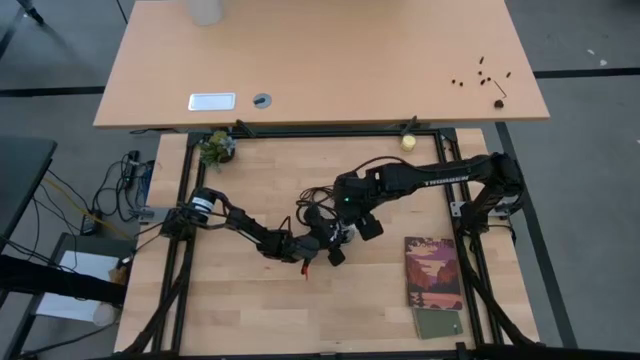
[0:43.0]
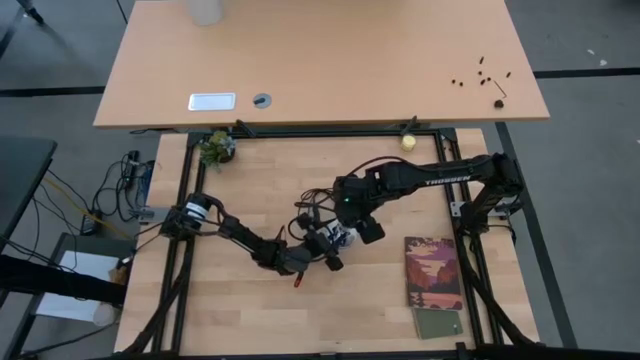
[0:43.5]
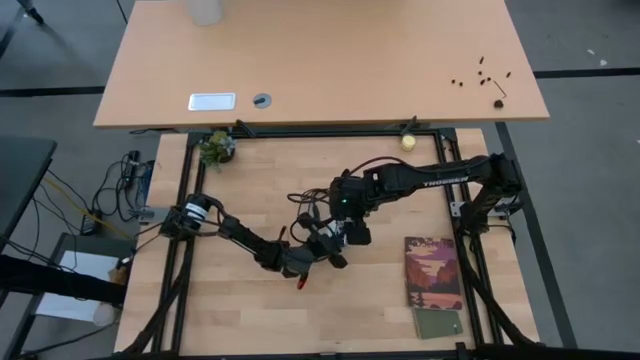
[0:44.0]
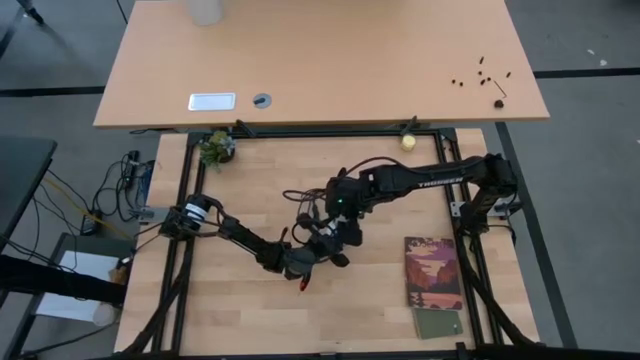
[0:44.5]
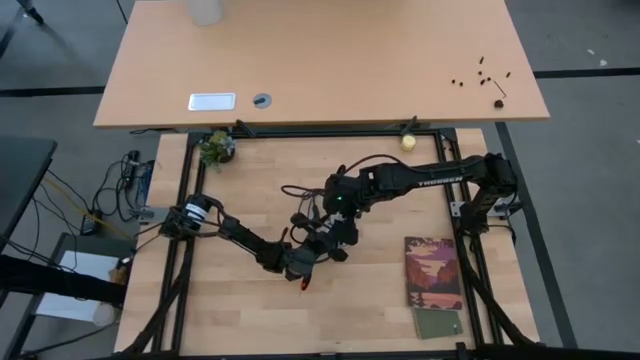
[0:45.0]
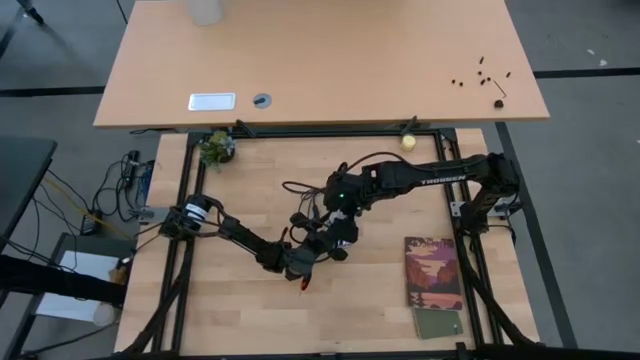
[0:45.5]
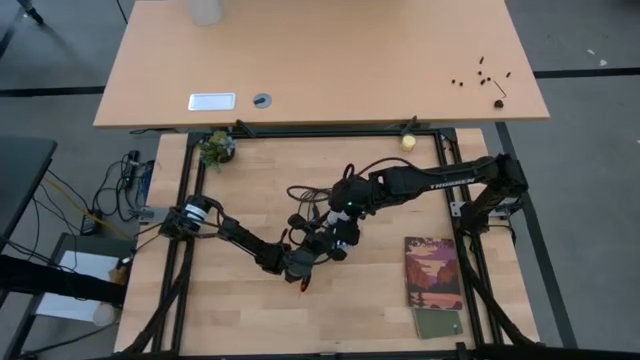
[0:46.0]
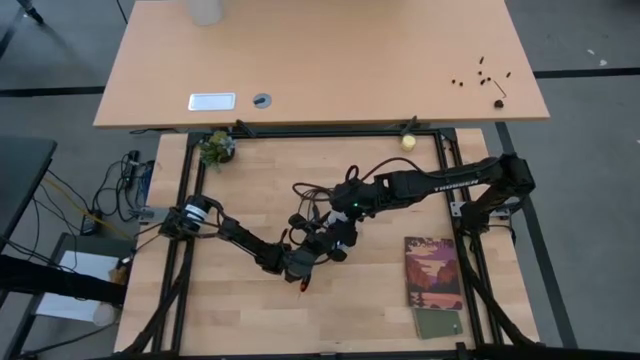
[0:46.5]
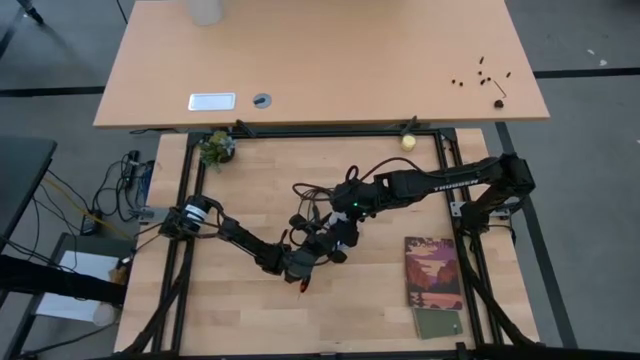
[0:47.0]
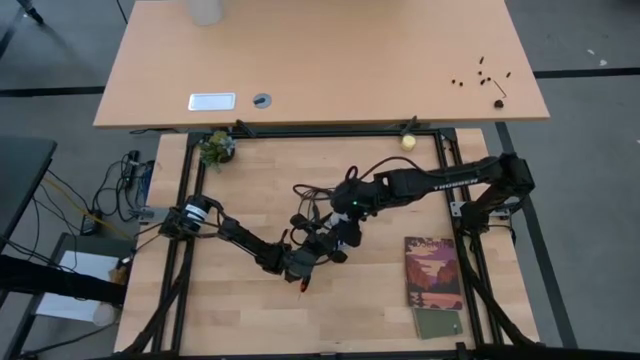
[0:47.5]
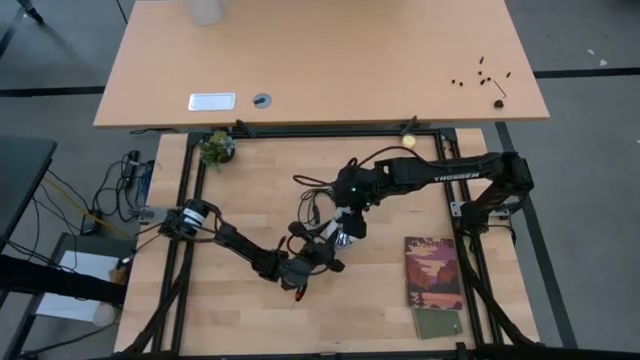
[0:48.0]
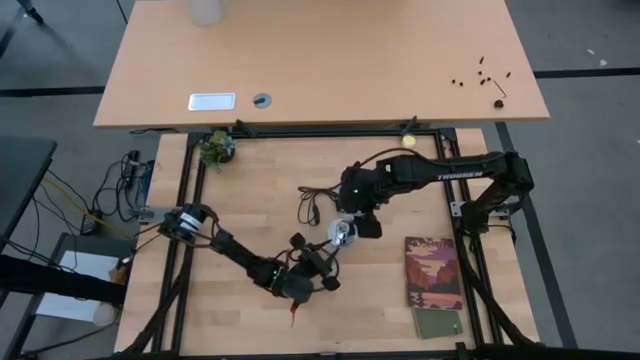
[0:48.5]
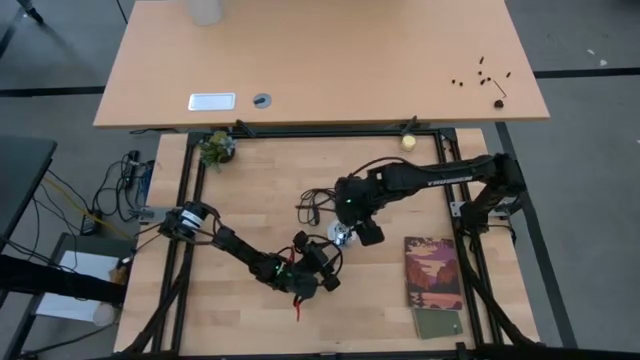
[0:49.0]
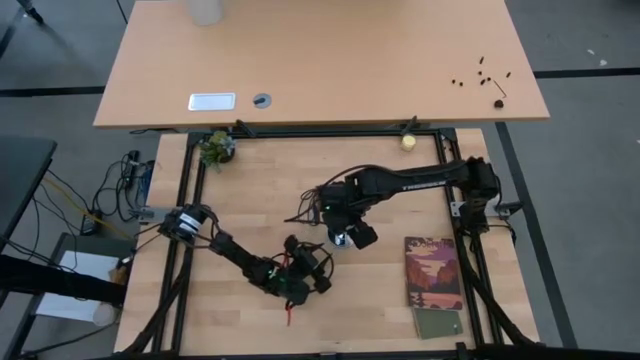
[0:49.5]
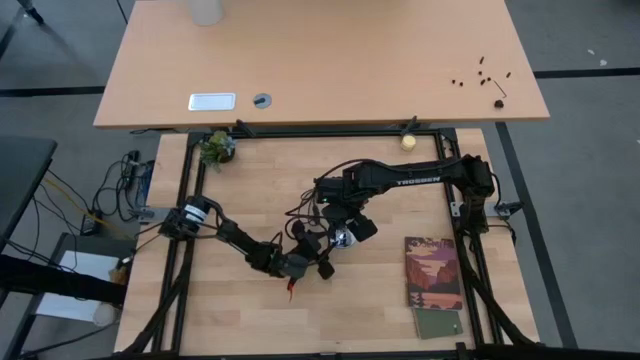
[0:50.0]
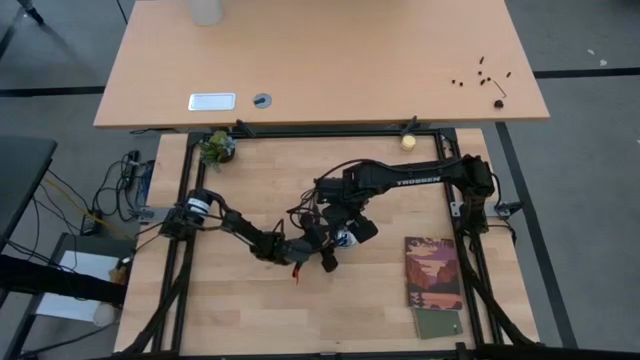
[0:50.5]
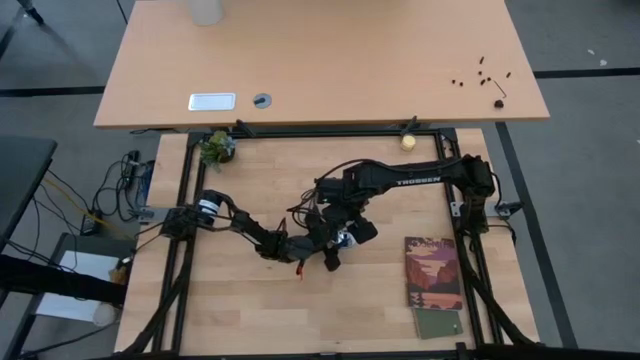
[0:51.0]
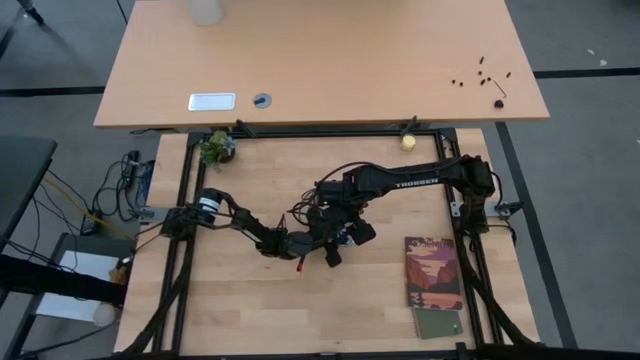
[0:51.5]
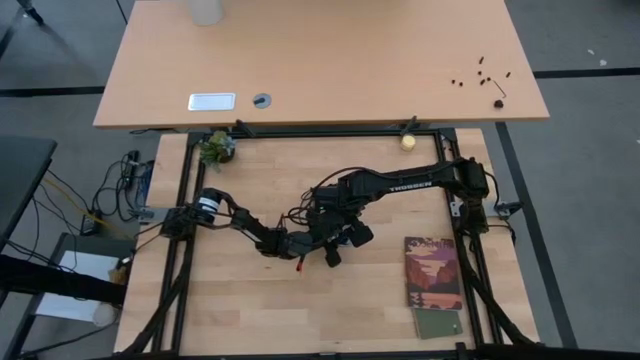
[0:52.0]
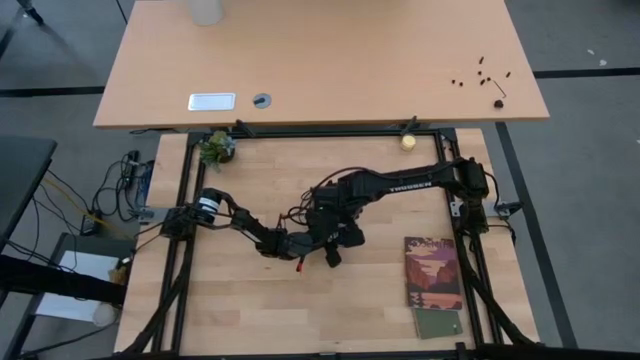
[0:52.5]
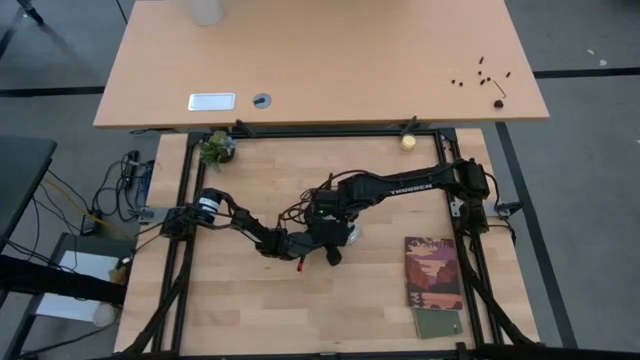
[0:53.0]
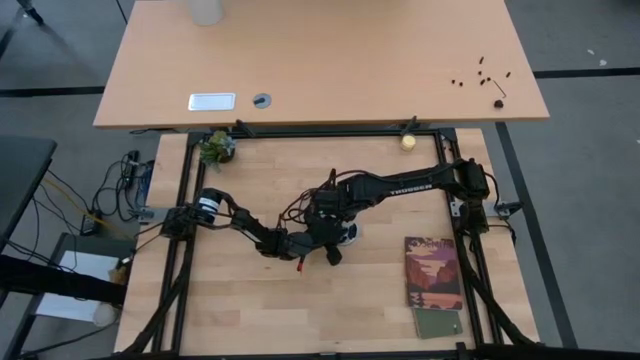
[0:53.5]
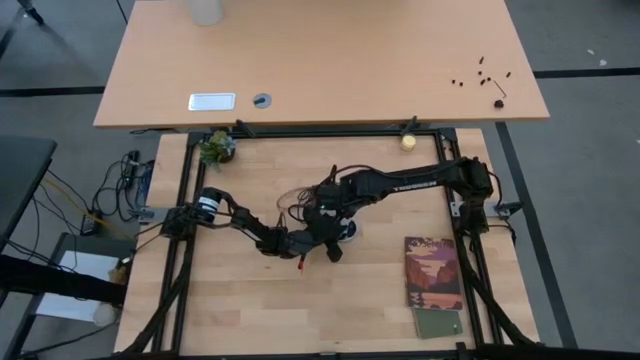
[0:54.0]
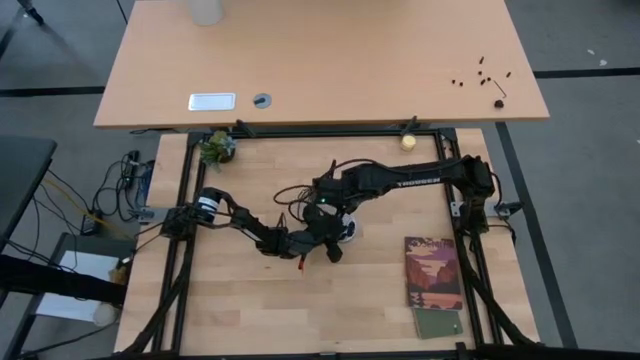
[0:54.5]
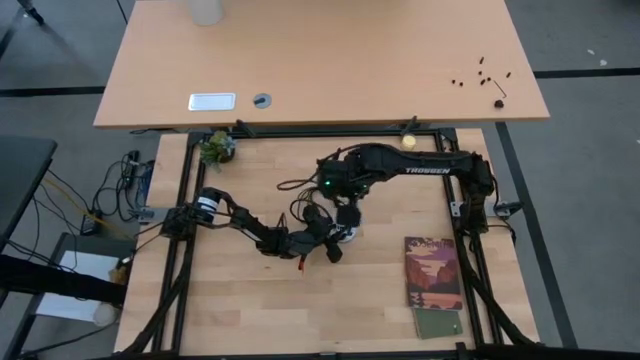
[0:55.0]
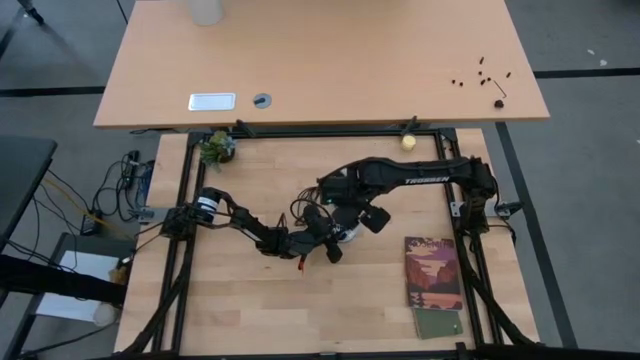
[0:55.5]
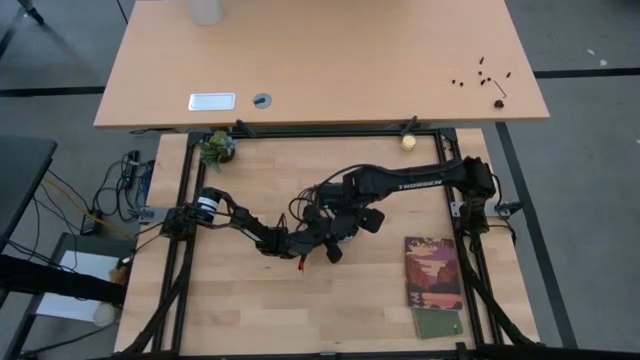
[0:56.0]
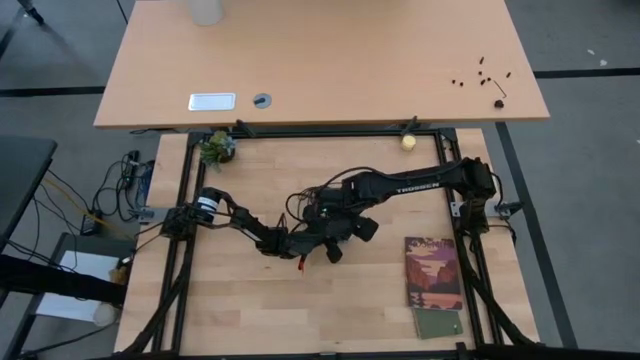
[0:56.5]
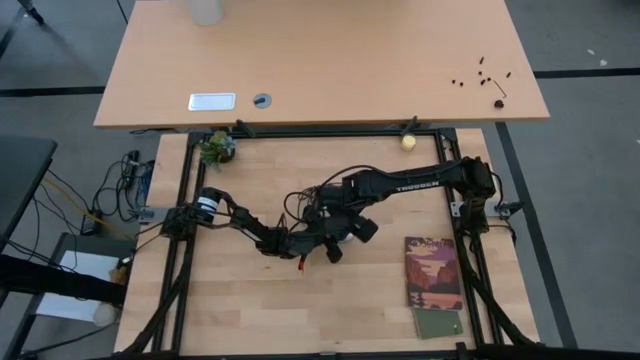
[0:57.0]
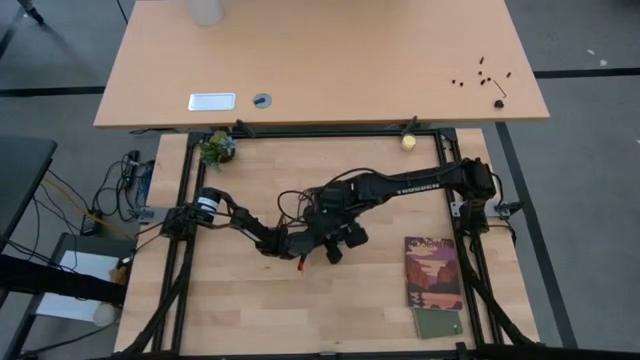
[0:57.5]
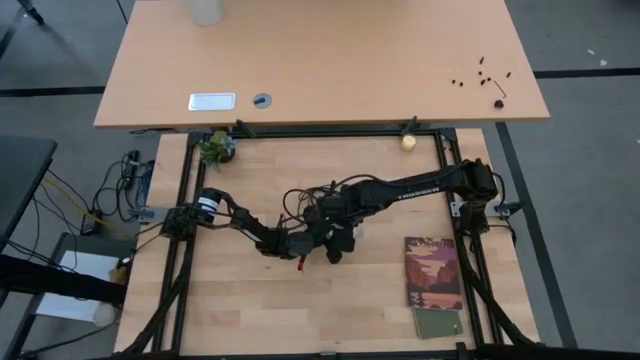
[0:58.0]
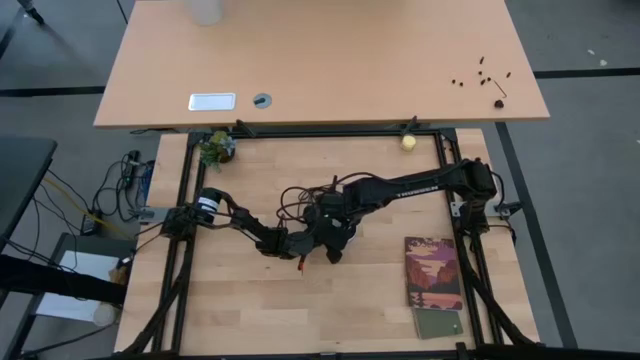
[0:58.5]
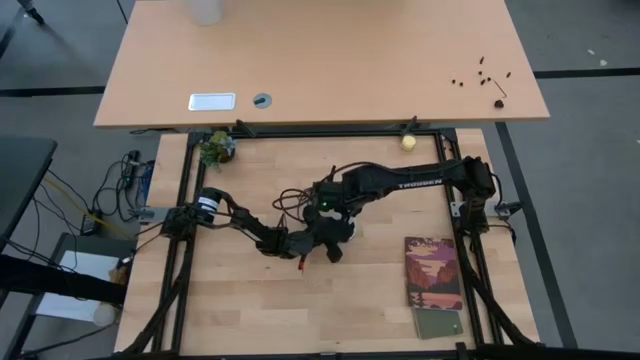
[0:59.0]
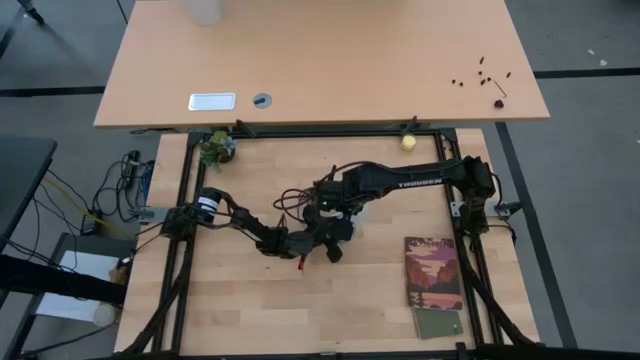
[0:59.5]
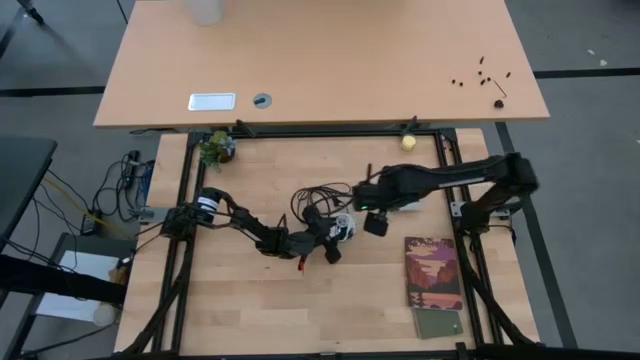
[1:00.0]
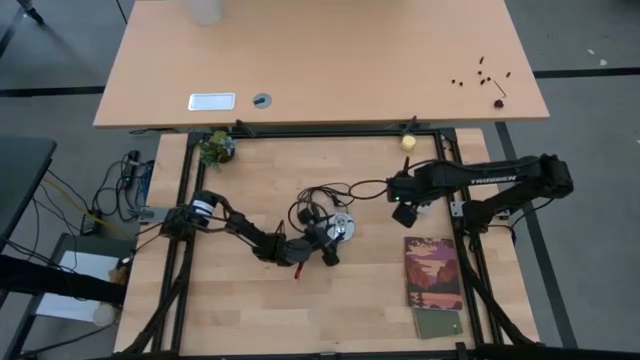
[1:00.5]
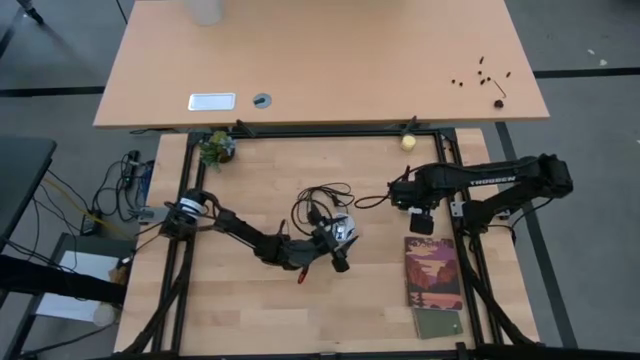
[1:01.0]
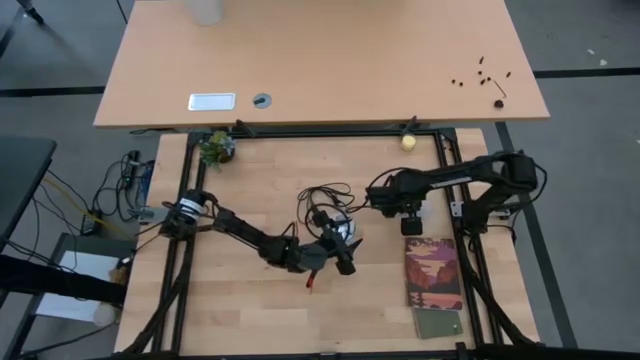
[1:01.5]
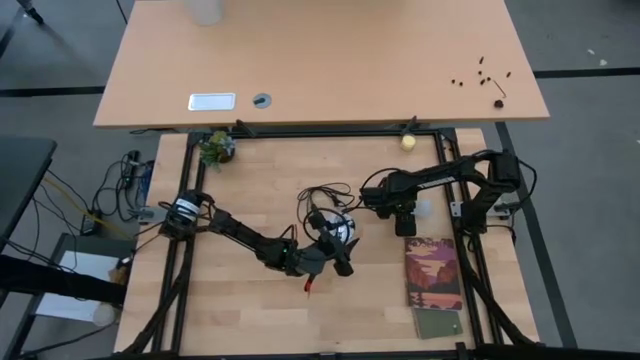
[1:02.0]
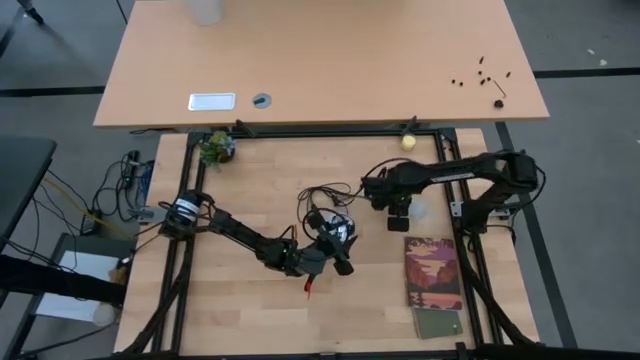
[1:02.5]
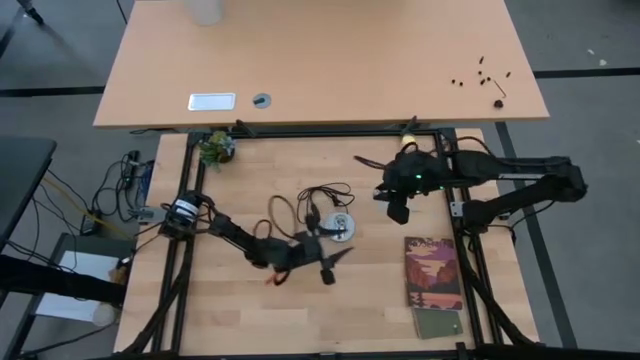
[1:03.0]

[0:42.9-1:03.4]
Task: Screw lightbulb
Insert the white lightbulb into the silver lamp
